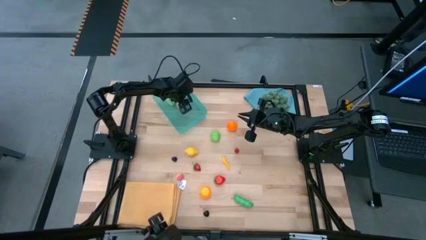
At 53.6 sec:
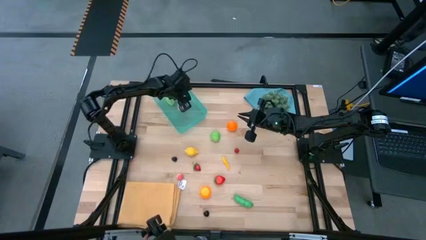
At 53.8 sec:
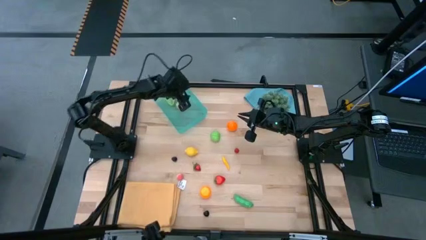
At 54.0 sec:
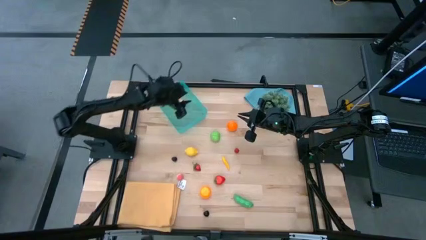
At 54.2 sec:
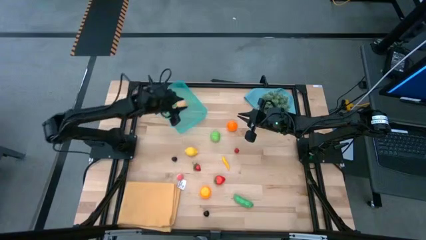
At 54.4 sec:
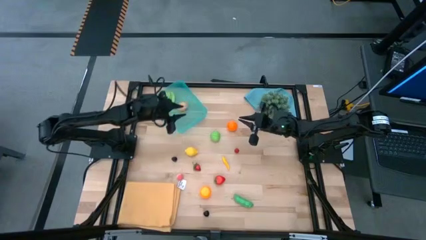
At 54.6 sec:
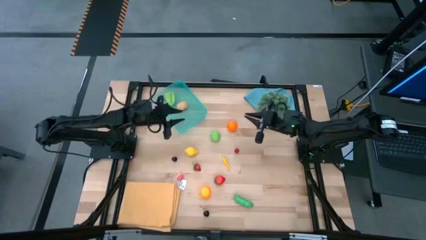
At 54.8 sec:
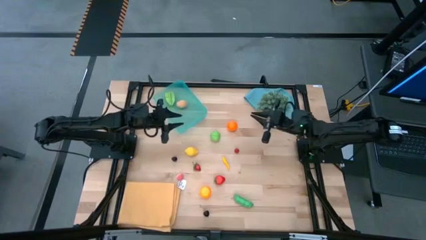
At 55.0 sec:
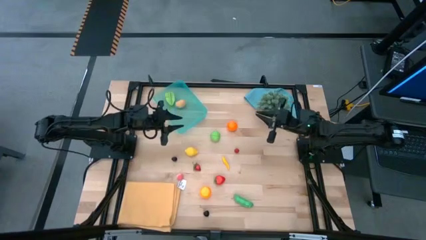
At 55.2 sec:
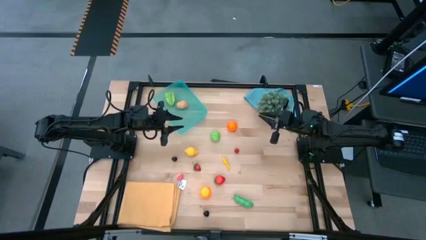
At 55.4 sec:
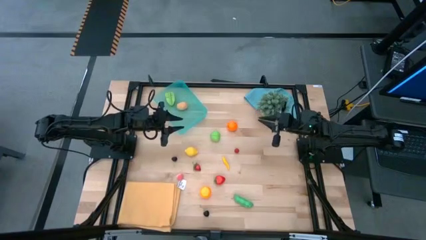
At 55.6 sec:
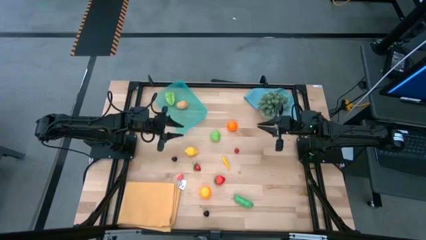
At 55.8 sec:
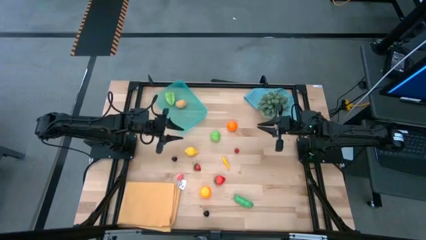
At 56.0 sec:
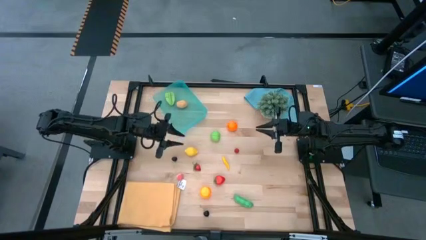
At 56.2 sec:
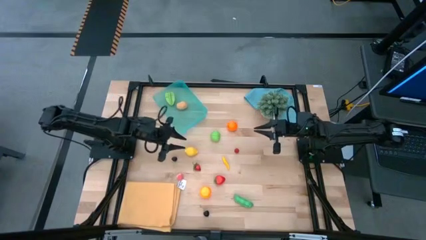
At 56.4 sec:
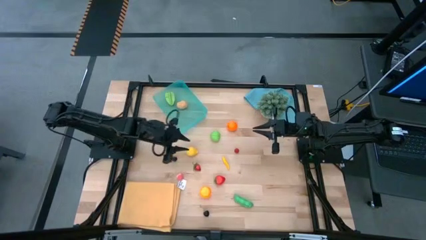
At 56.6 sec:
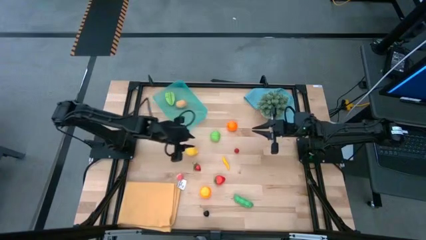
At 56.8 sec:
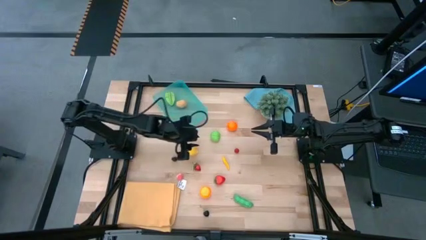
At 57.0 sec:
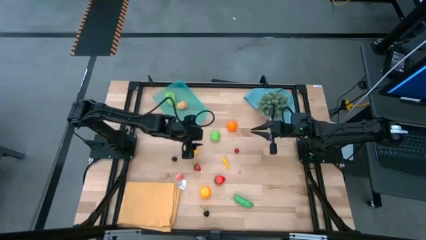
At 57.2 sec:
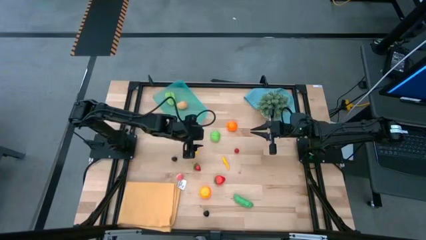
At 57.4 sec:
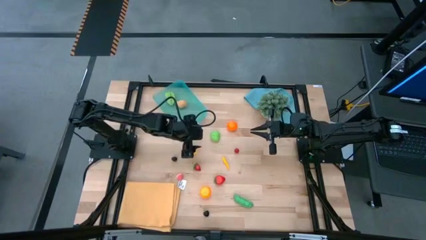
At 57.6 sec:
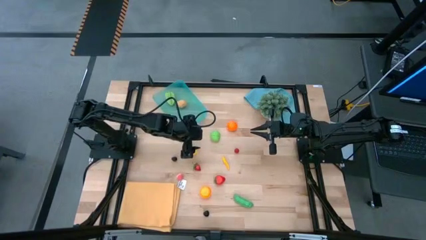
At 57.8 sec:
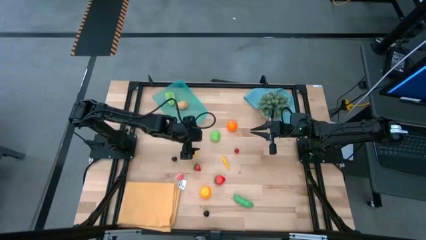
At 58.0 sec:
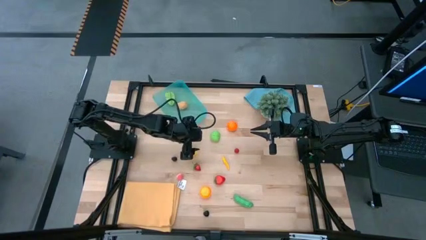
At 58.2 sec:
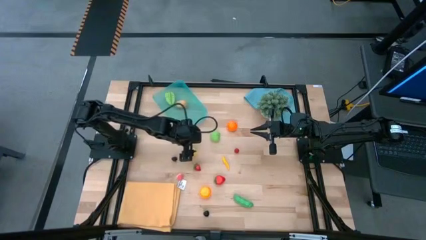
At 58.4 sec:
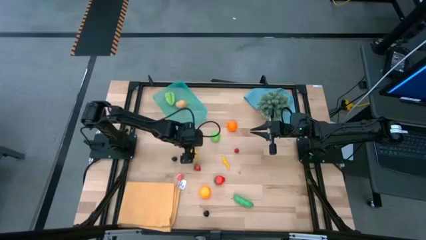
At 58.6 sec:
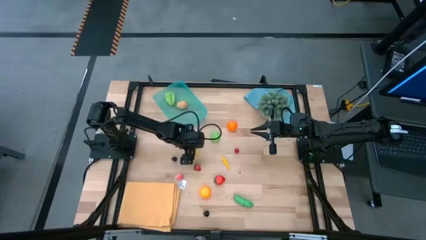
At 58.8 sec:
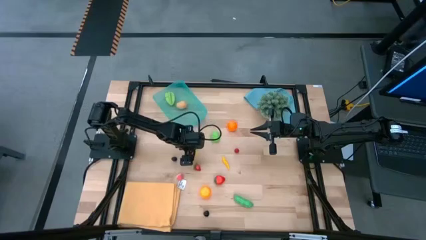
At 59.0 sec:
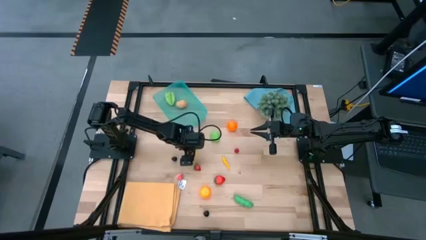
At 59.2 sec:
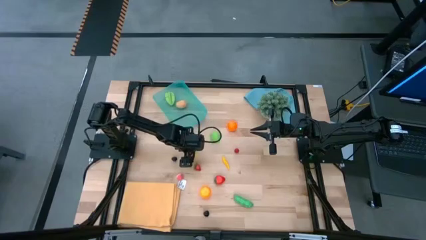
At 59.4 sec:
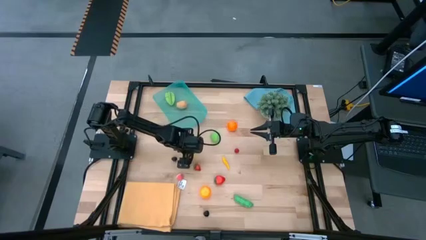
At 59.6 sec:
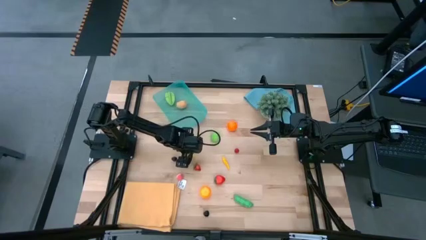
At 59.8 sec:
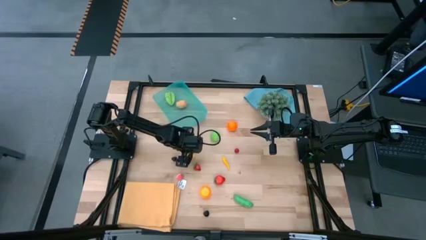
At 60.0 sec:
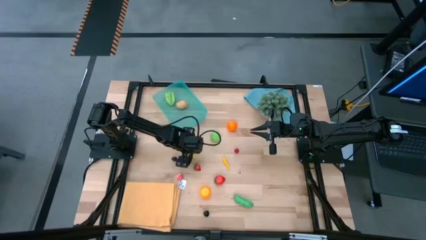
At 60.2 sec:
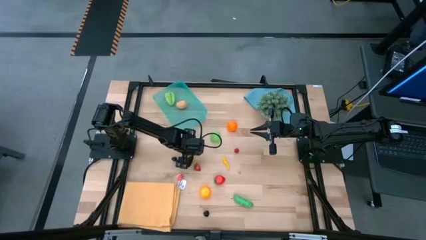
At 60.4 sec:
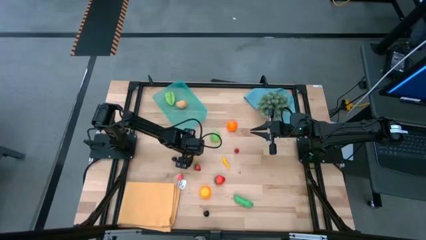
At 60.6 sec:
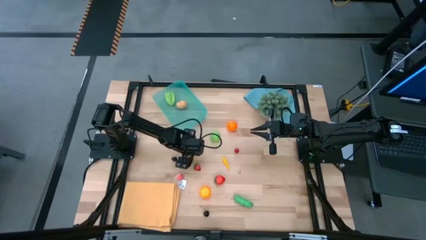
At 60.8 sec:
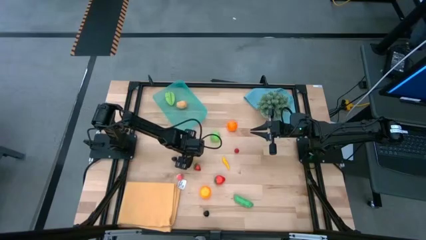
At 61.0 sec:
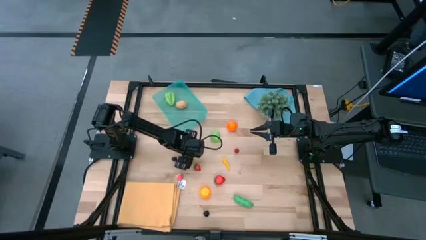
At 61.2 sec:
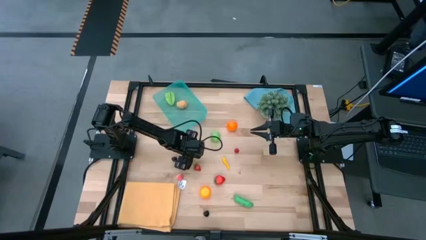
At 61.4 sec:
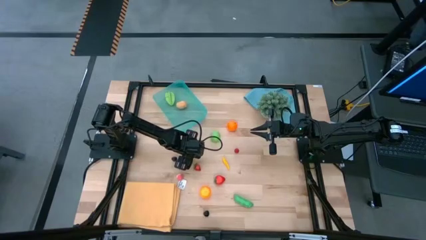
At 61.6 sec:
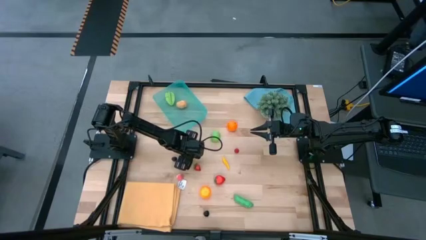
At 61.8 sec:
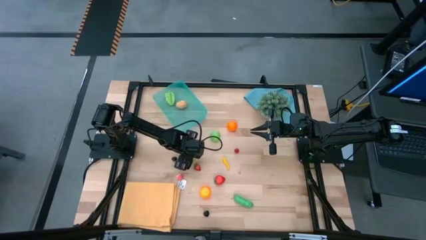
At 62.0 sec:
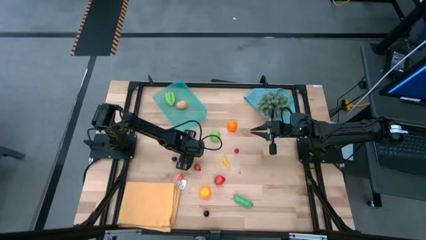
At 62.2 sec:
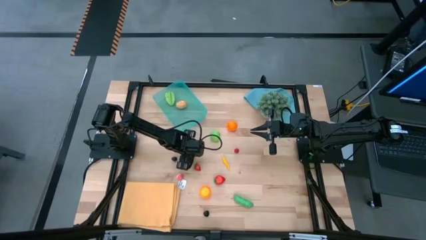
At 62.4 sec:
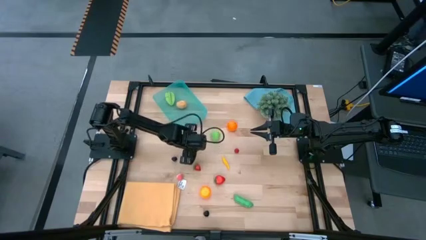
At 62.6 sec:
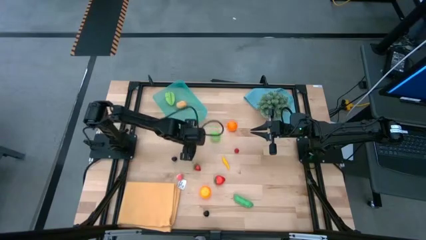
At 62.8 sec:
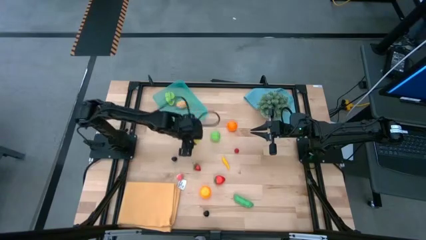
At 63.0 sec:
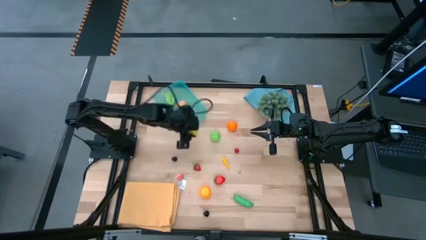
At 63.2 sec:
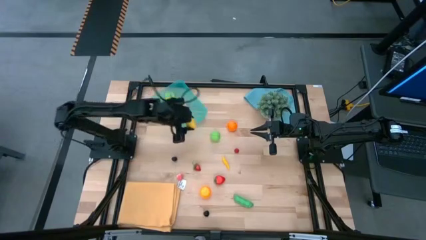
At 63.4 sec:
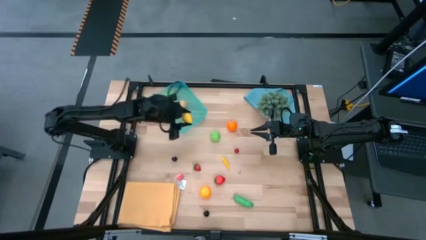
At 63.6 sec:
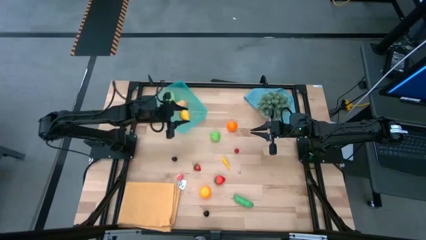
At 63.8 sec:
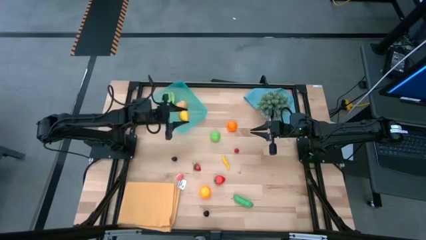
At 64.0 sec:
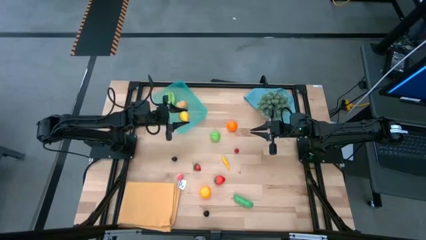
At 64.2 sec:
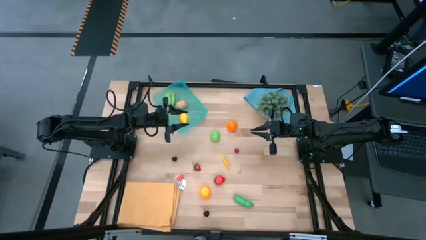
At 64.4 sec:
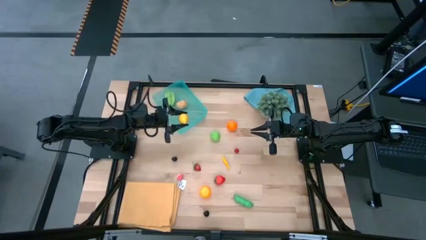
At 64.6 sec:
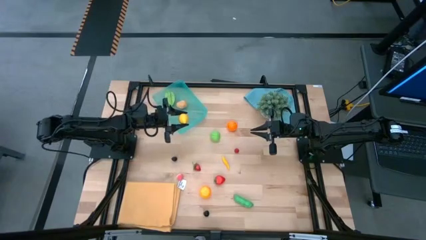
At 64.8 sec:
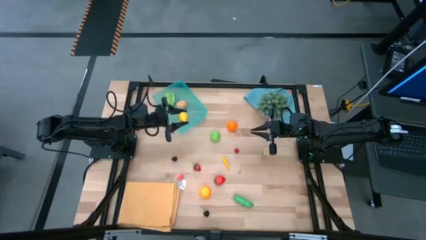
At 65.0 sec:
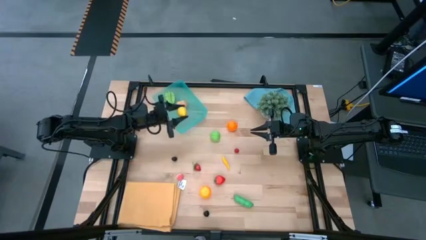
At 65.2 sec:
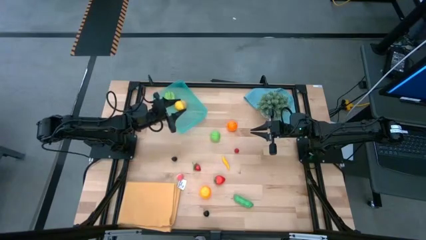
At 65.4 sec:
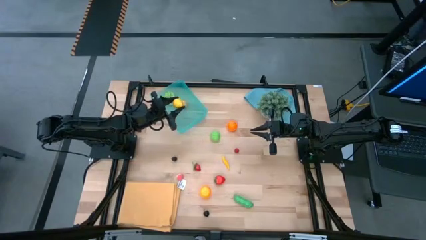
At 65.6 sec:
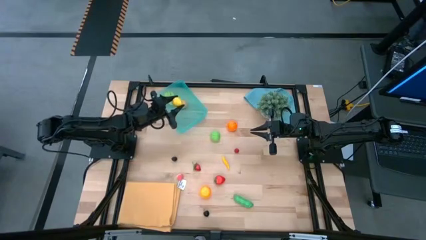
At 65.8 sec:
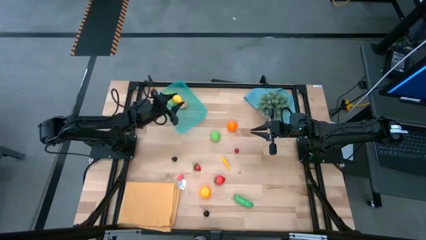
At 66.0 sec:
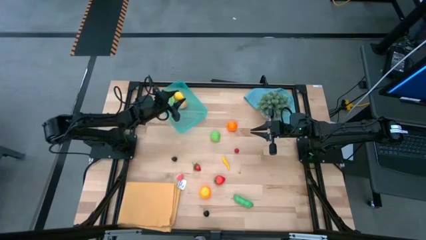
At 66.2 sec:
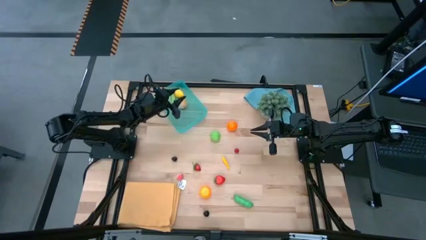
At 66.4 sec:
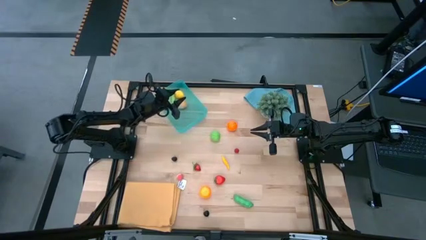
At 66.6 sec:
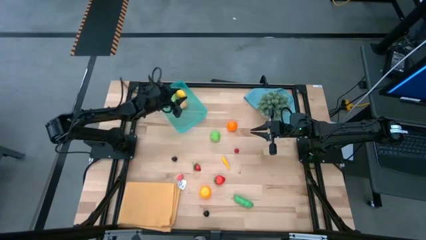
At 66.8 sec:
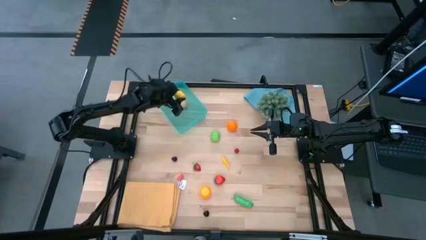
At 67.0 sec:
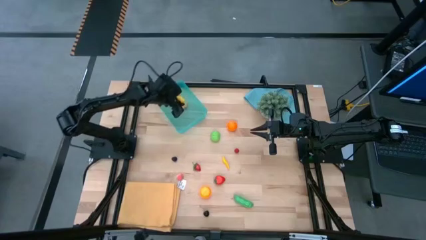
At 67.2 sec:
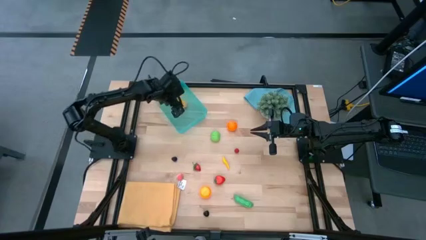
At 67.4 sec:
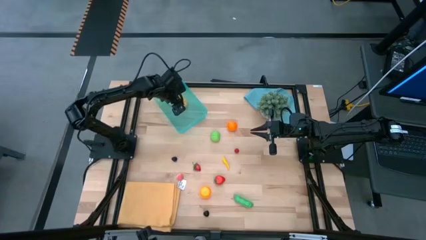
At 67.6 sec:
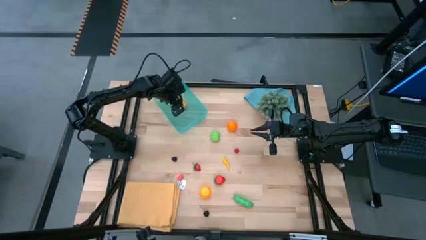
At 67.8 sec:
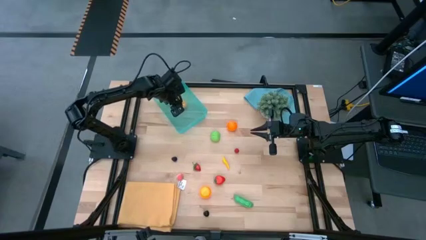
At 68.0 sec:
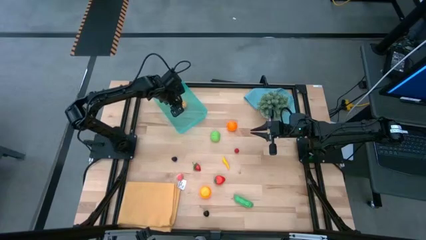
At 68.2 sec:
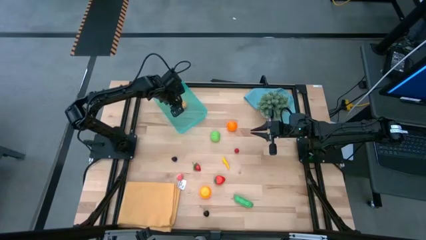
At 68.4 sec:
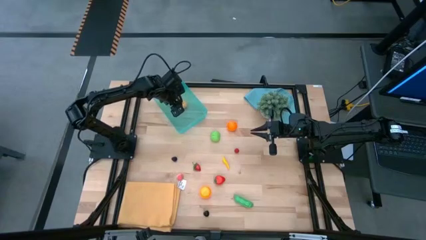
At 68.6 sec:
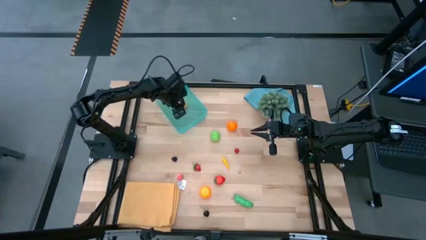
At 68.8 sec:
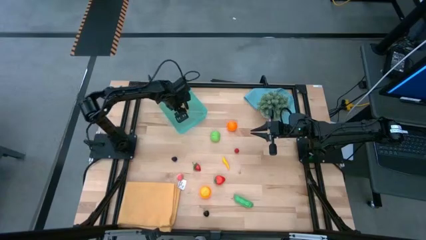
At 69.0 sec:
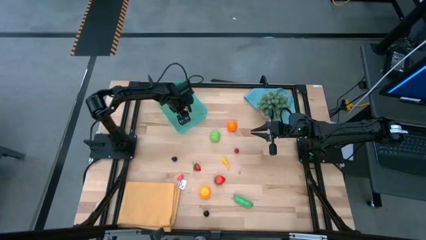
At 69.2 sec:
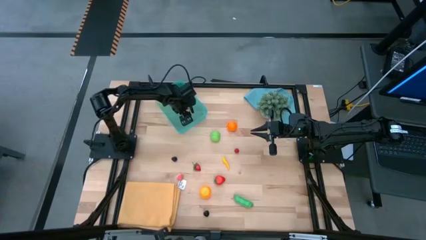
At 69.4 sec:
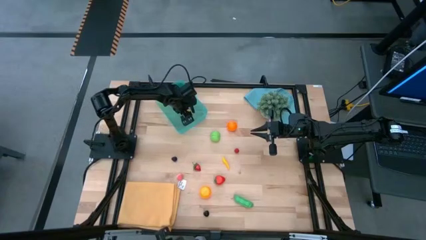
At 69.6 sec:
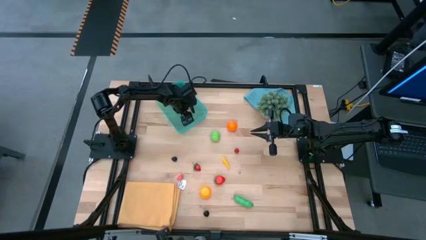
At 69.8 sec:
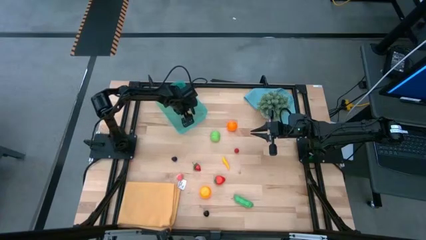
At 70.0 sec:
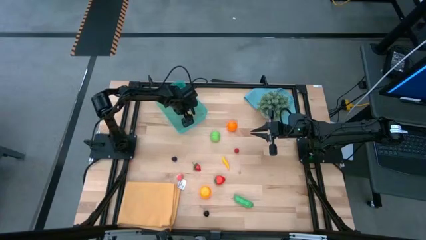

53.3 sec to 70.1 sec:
Task: Pick and placing Produce into tupperware
Put the yellow lemon into the blue bin
